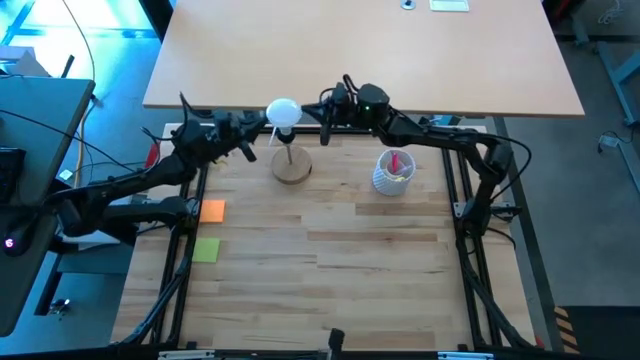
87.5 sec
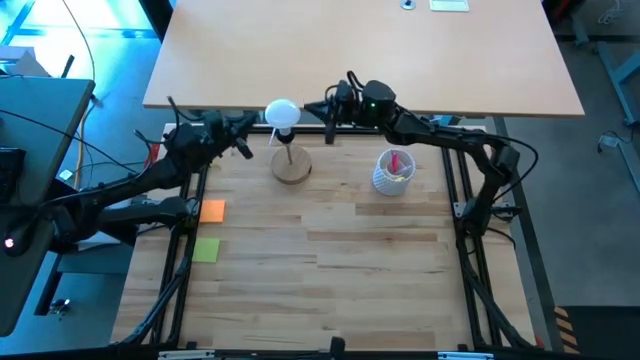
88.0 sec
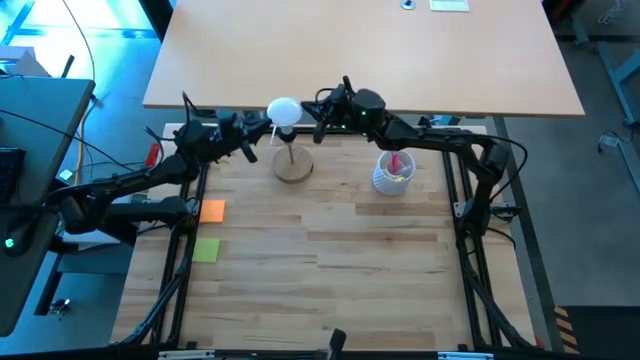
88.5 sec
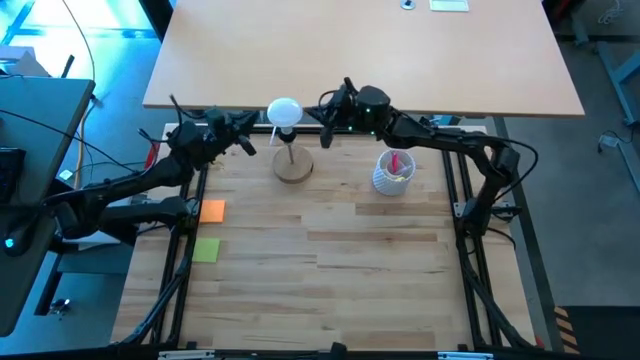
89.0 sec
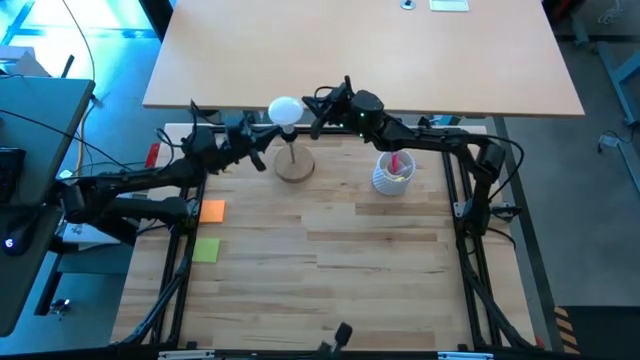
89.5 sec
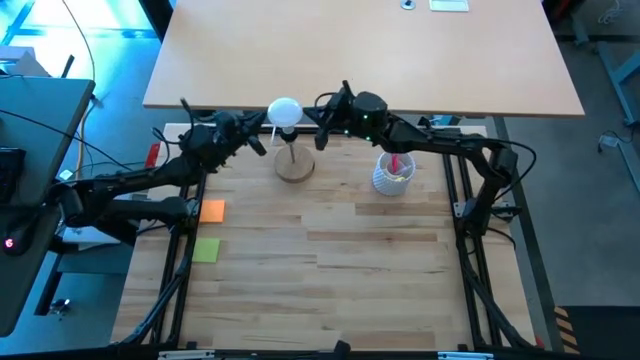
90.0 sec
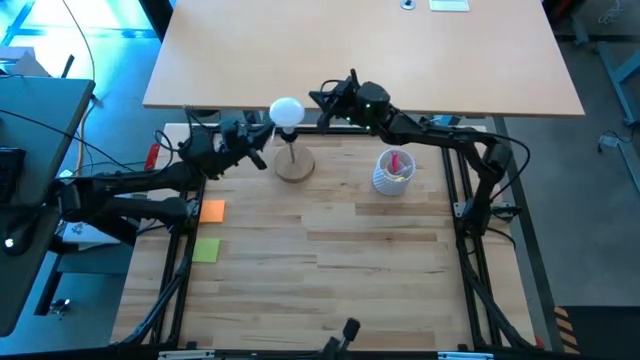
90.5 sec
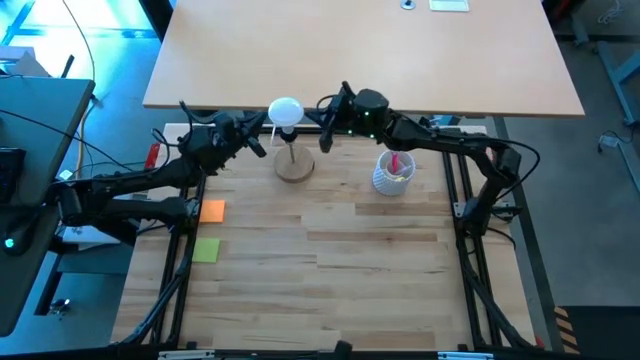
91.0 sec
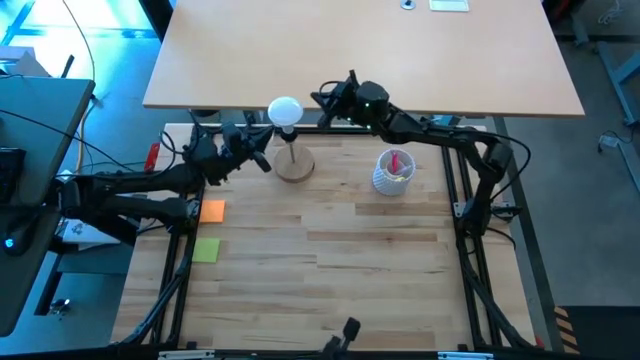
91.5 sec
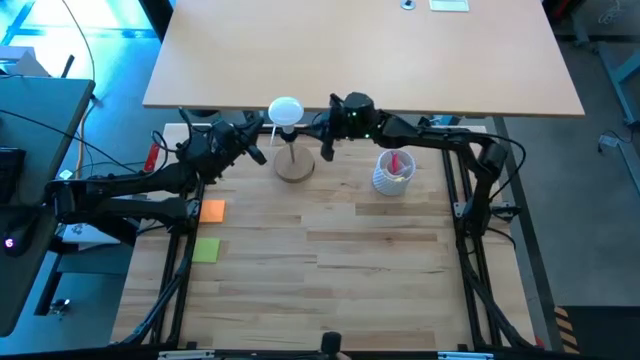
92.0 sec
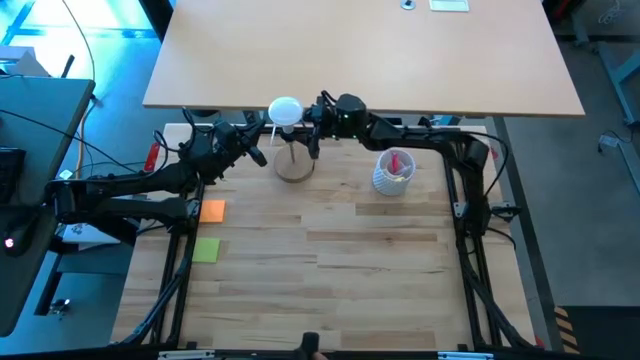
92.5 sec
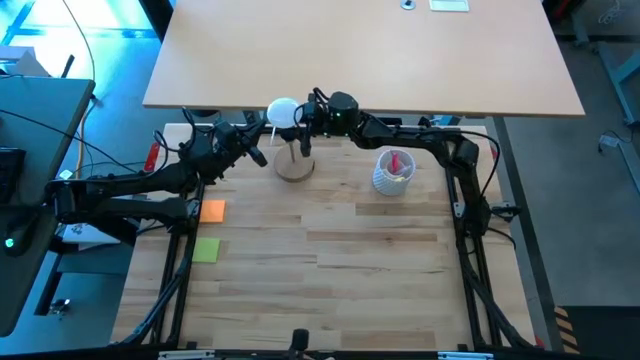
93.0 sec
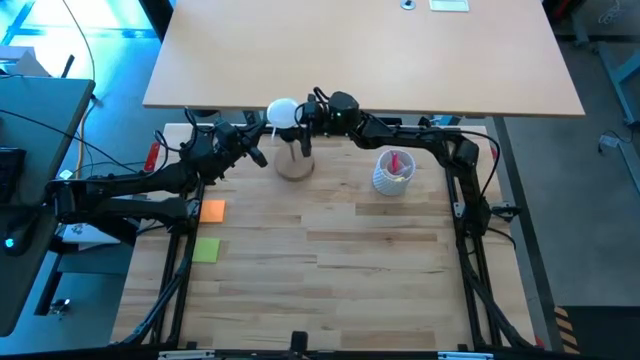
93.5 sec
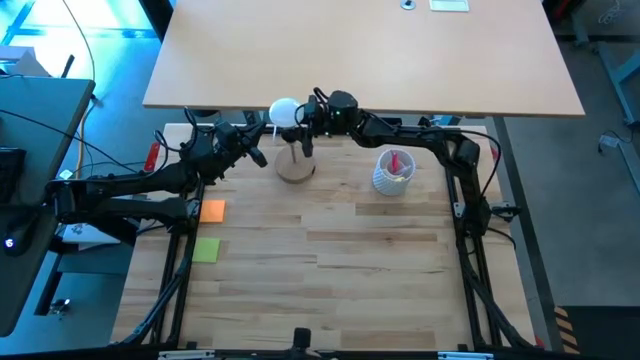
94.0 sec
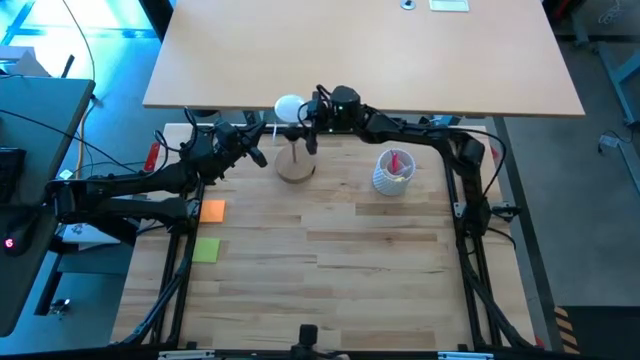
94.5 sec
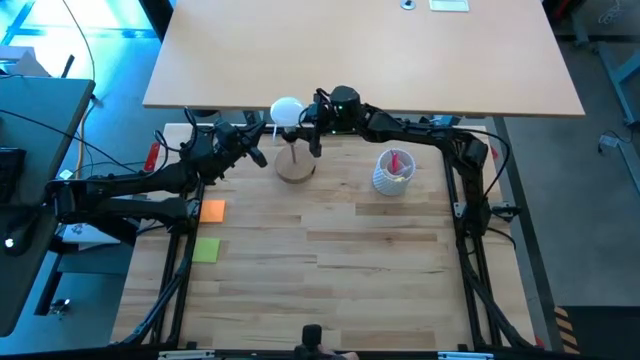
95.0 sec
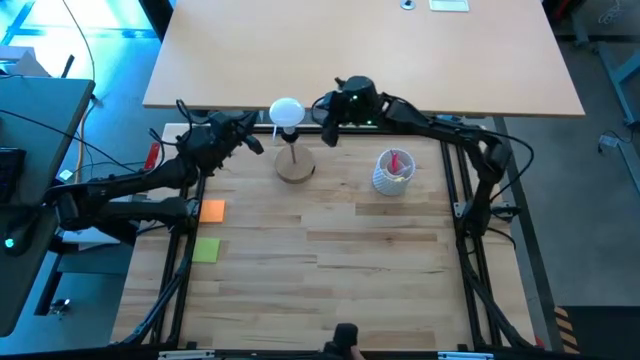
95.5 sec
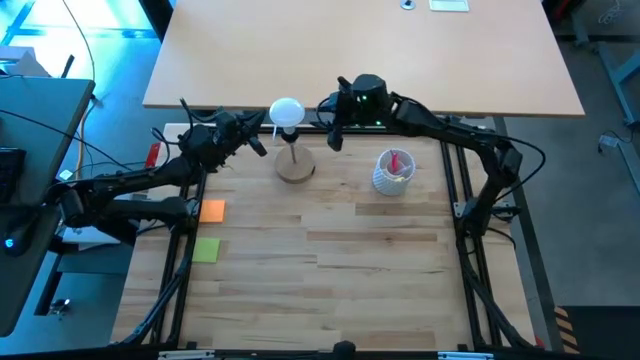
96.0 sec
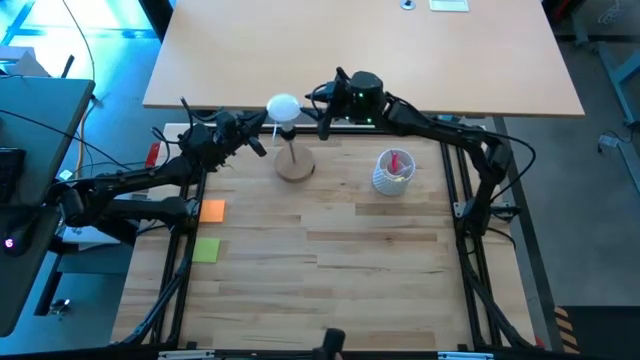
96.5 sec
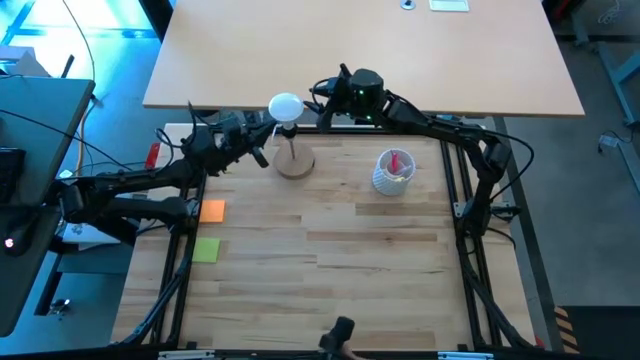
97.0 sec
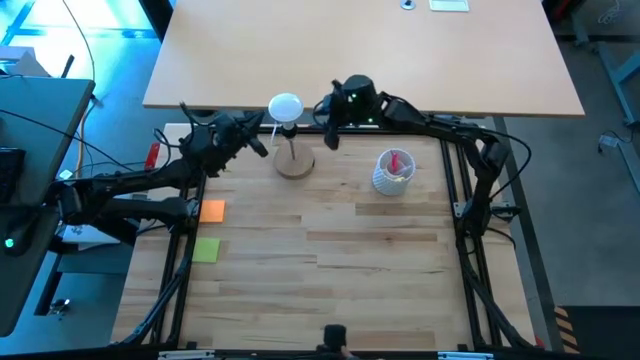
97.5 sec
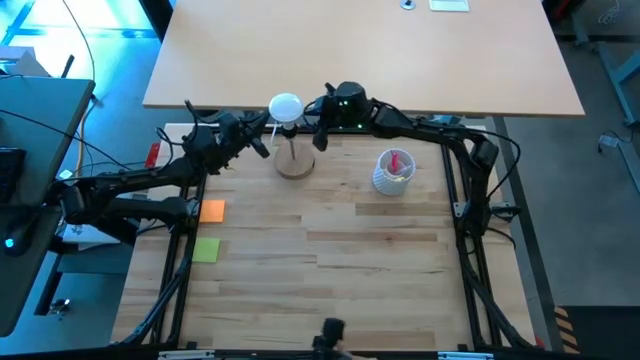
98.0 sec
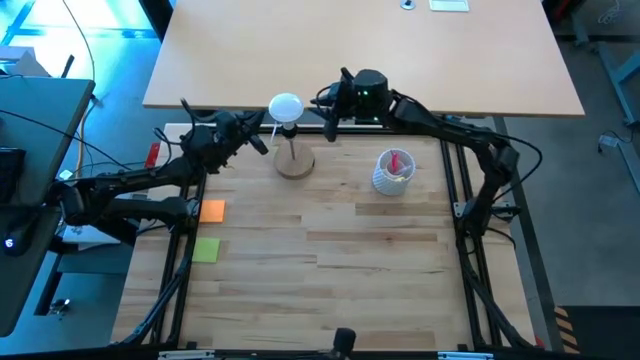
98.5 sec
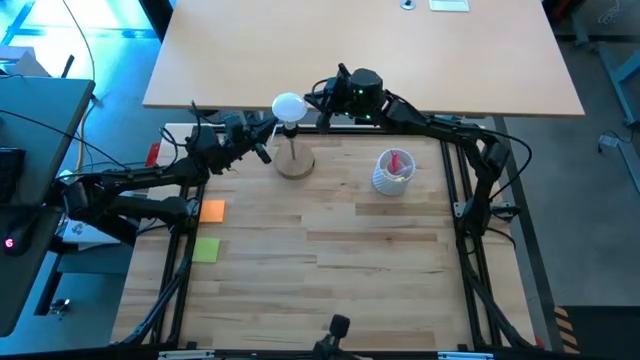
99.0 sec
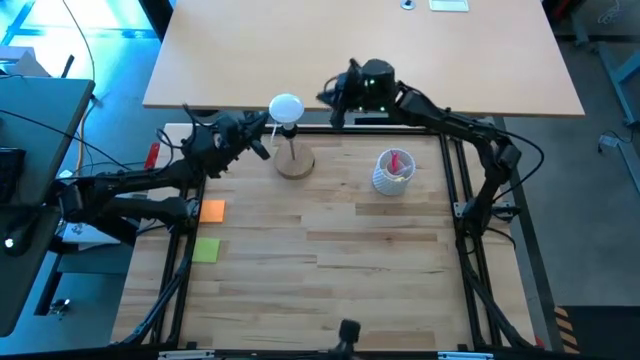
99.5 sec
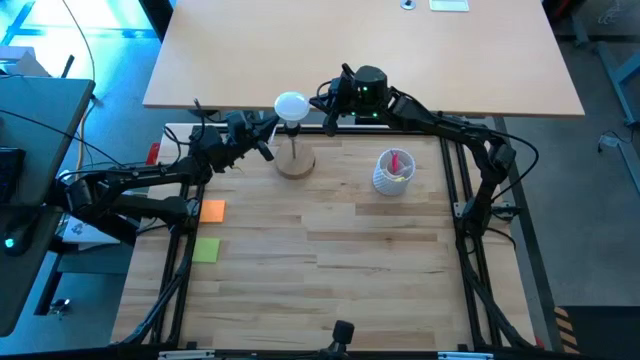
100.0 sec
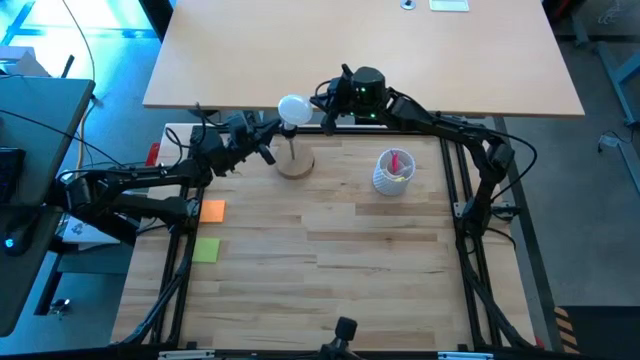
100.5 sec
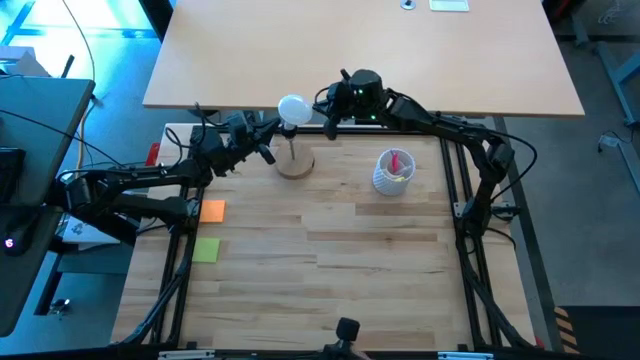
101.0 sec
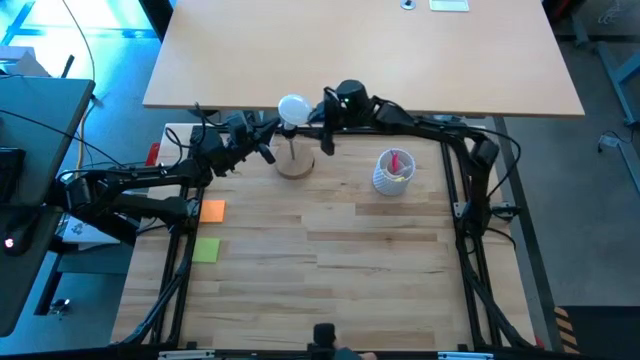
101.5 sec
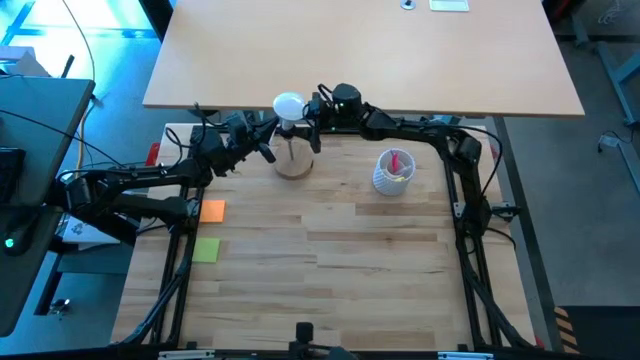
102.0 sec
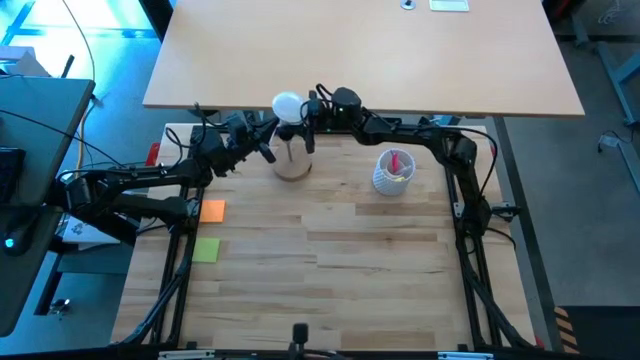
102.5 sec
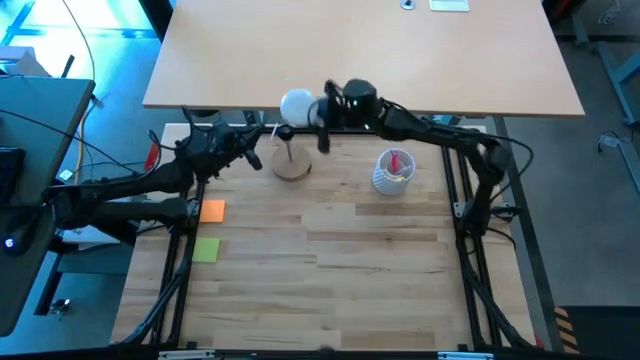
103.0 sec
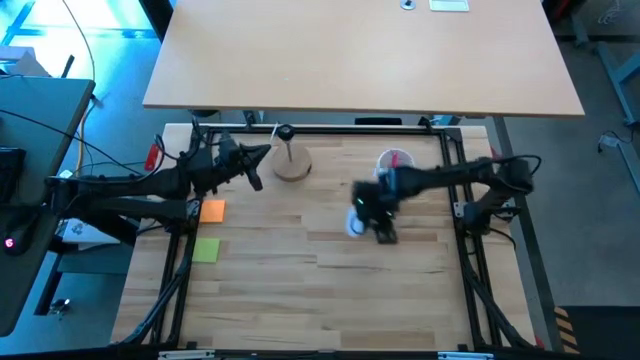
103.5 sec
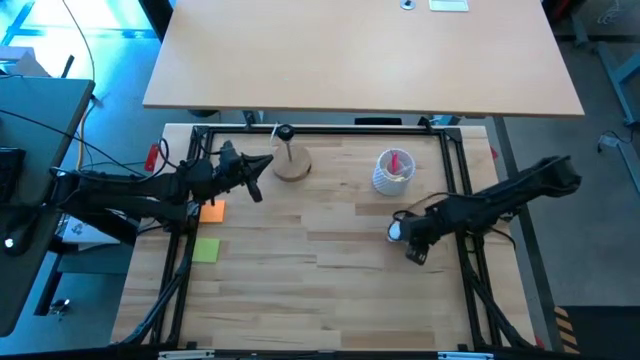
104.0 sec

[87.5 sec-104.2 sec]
Task: Screw lightbulb
Remove the lightbulb from the lamp

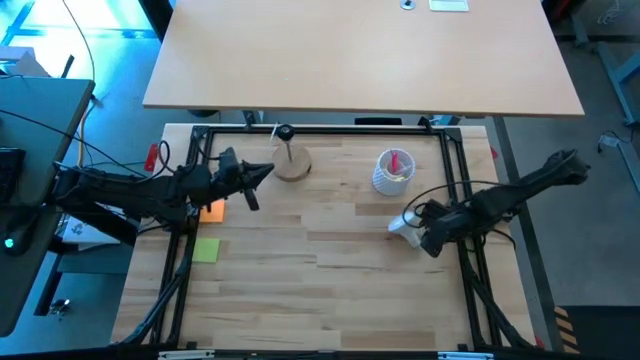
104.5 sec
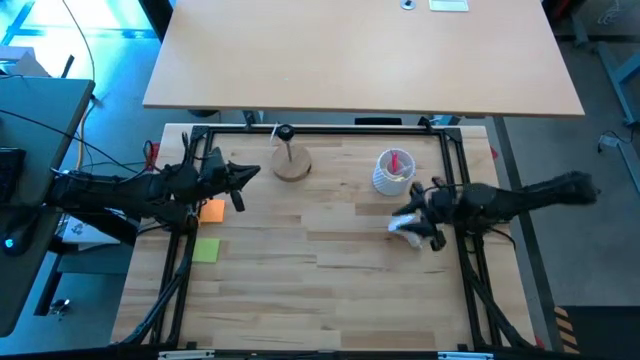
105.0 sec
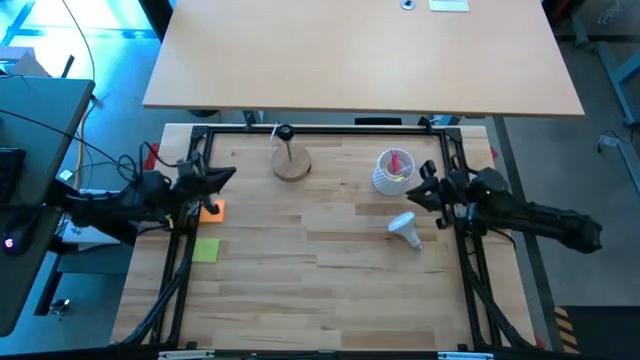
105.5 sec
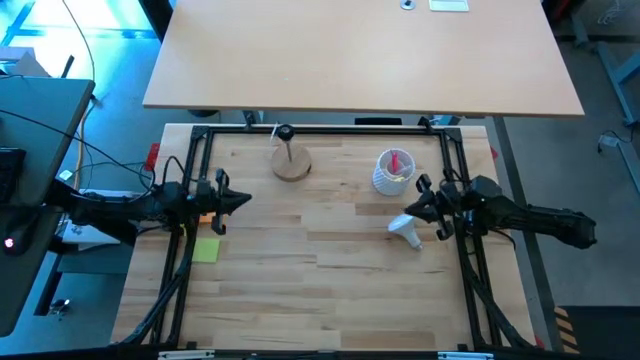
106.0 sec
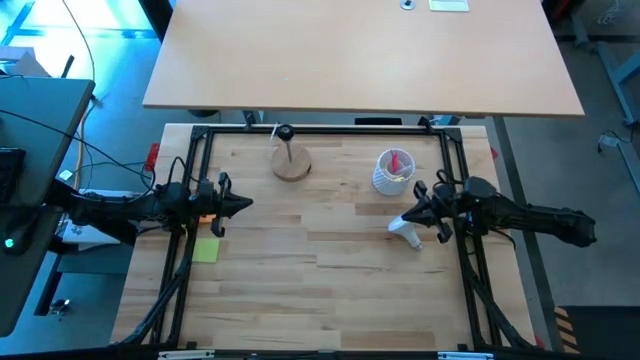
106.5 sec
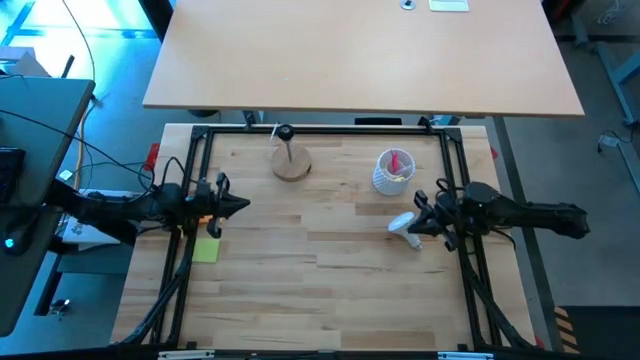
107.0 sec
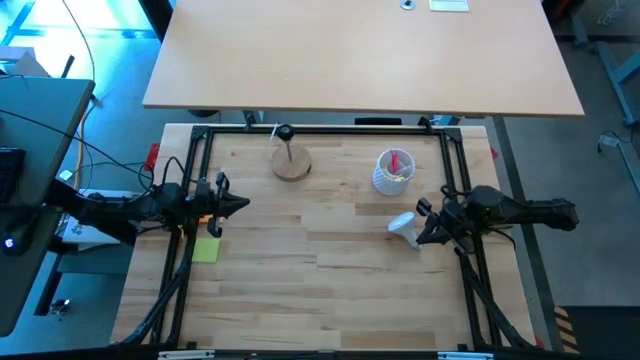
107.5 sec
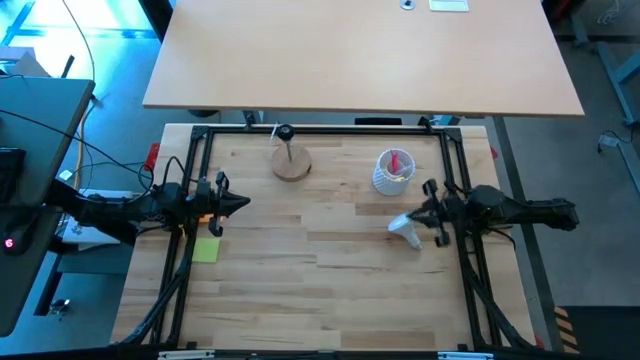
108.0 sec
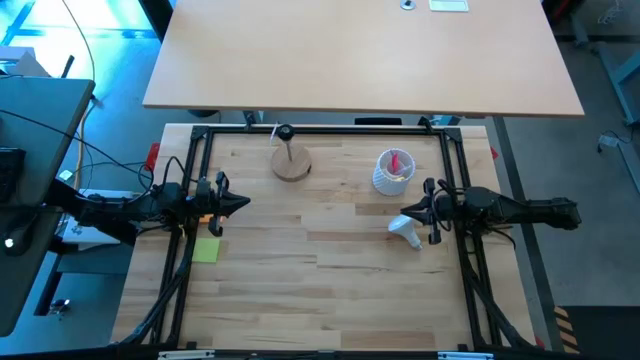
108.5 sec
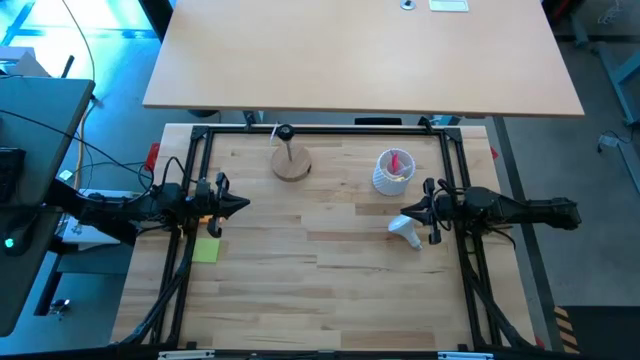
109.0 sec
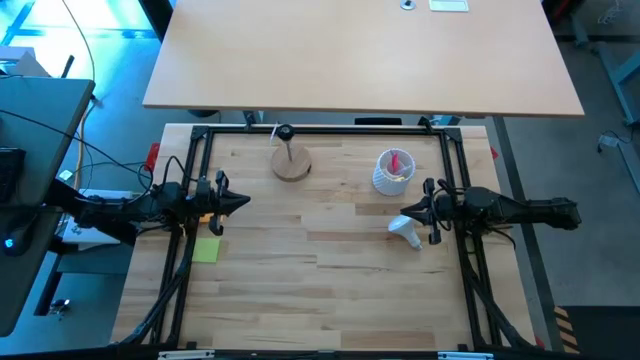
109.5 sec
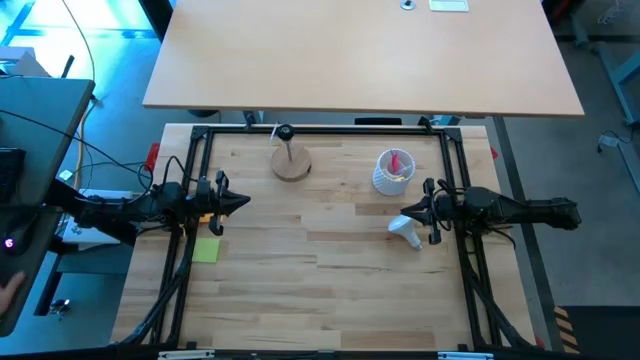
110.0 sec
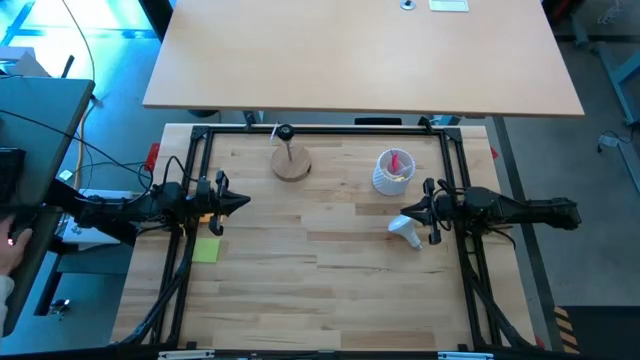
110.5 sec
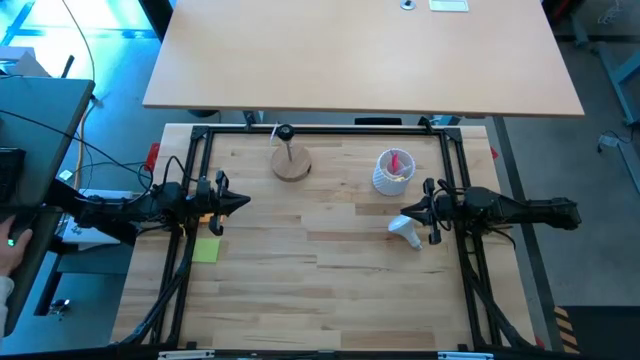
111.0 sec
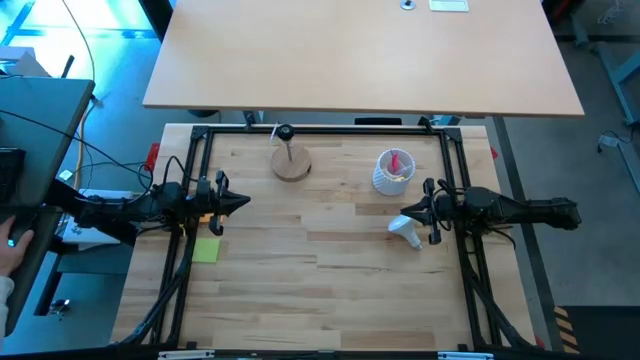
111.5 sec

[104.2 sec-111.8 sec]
Return to Home Position
